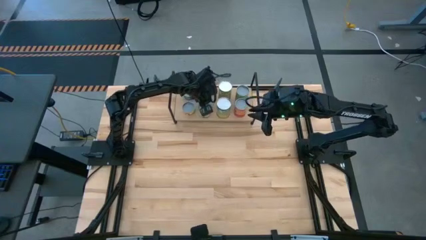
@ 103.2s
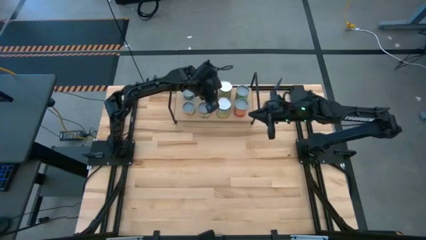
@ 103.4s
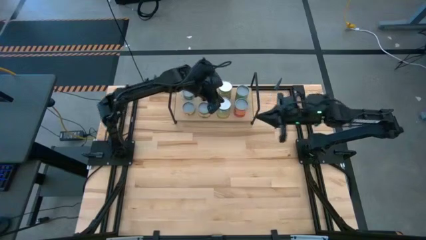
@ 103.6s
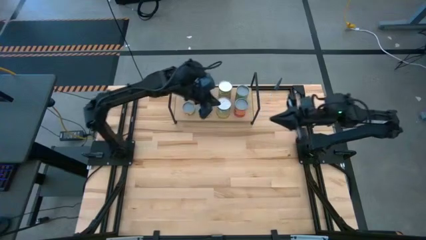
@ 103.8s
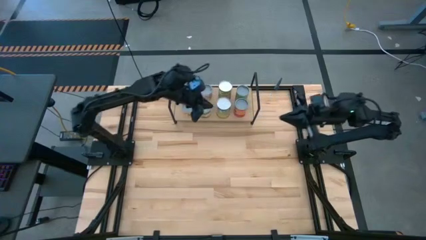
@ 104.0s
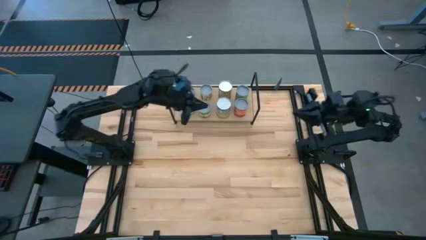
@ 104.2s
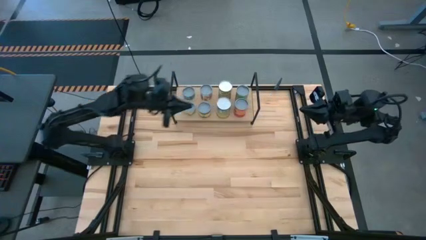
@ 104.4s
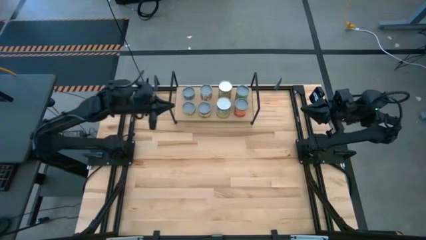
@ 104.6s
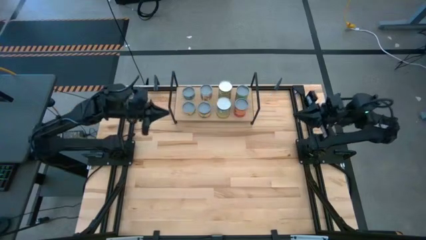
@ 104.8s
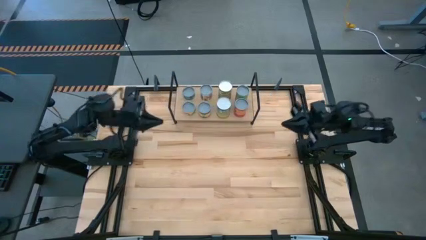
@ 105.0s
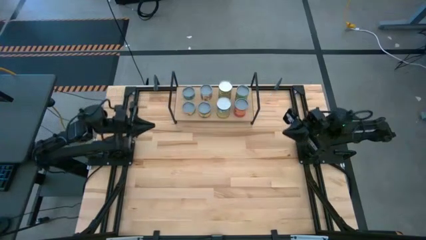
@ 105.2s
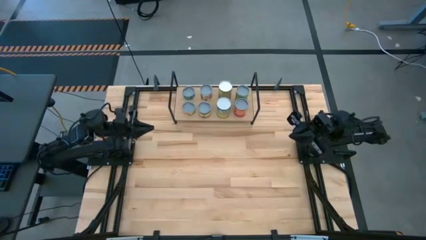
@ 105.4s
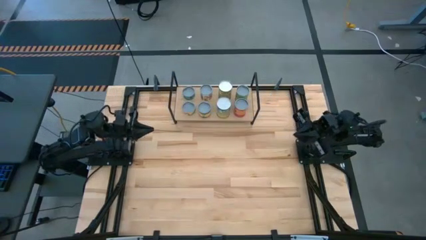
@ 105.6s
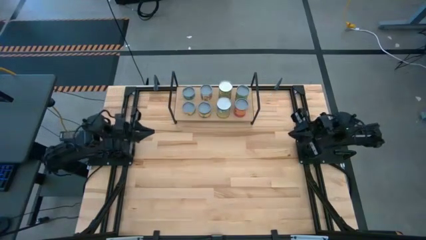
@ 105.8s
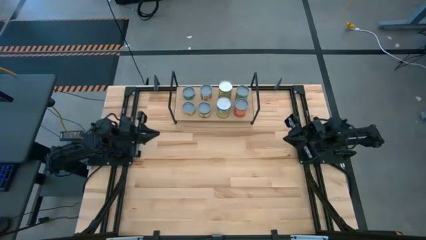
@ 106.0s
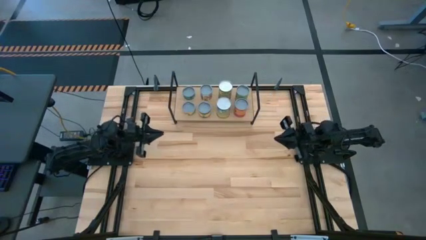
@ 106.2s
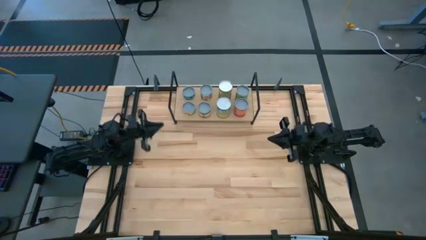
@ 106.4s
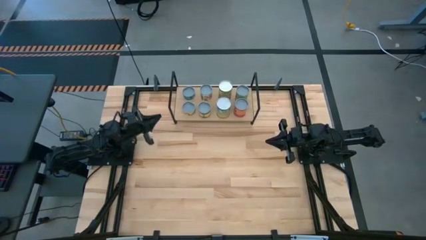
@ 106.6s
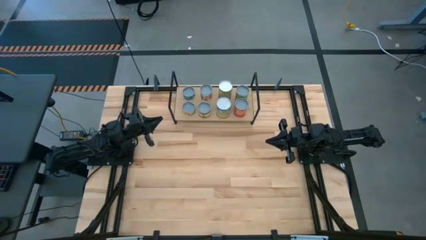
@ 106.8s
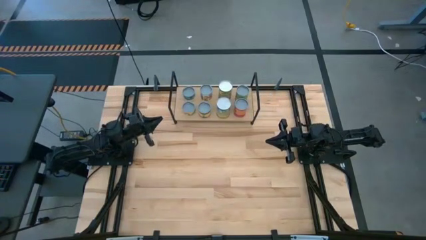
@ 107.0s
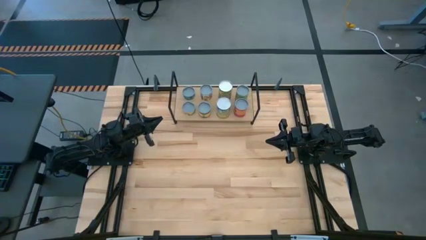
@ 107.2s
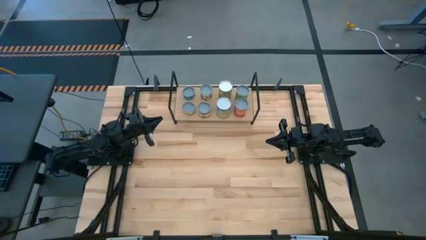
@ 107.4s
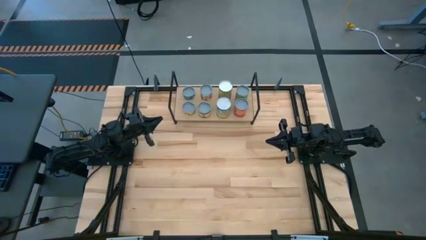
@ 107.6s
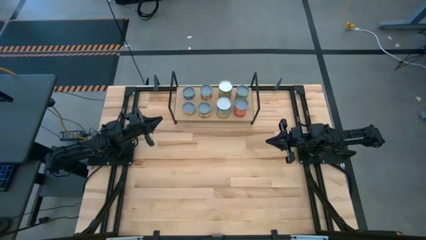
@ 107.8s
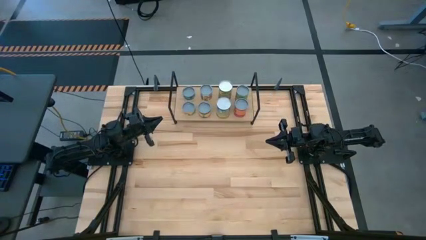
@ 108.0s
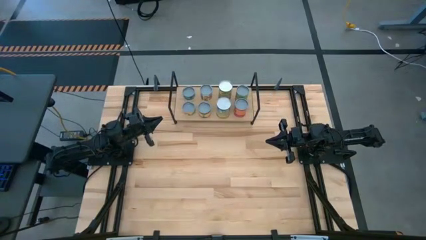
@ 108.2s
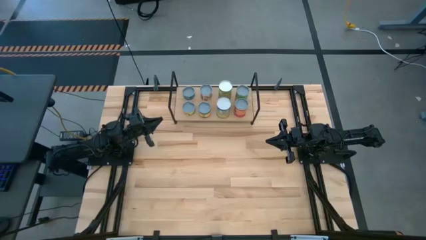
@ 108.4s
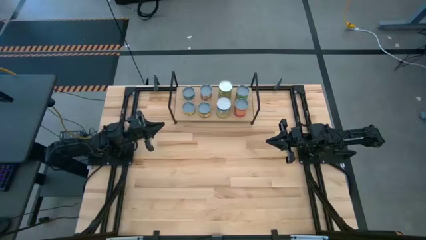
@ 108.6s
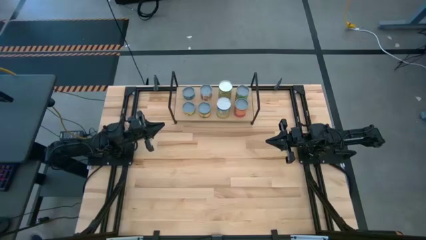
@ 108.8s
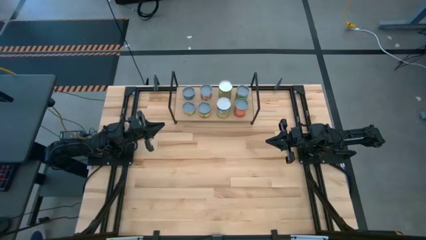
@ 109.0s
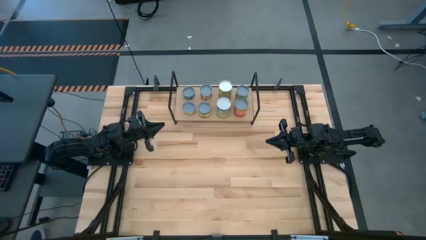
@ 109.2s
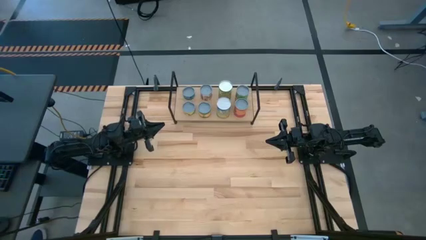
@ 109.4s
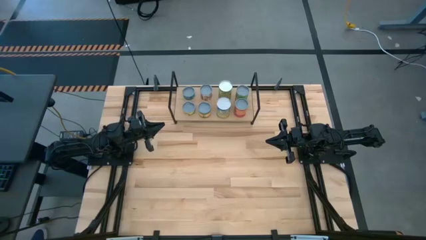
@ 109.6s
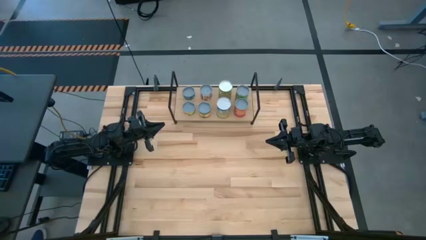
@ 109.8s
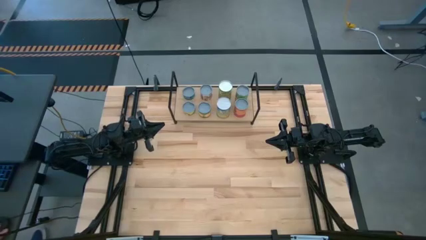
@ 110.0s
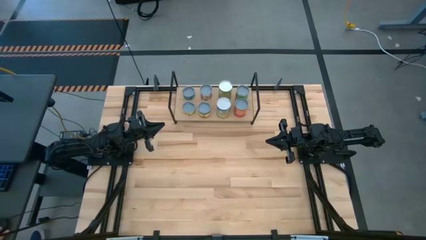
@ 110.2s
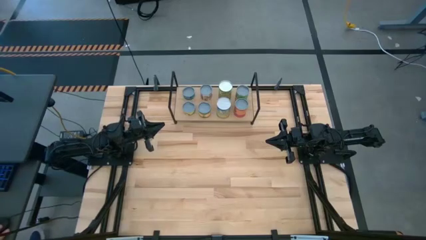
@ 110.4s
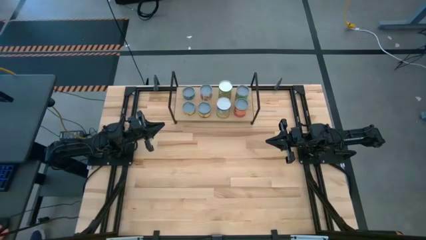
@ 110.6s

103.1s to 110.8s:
Task: Pick and place cans onto a shelf
Return to Home Position

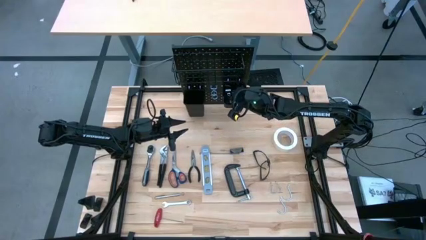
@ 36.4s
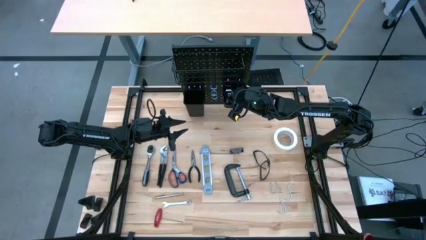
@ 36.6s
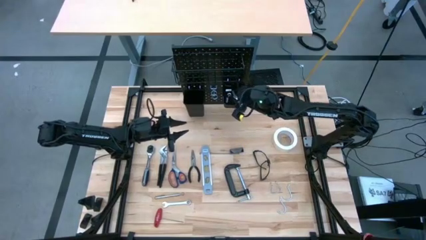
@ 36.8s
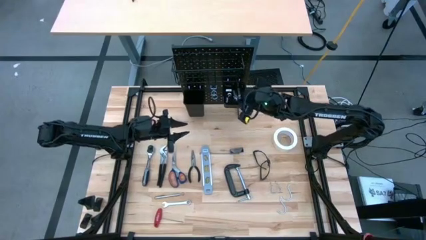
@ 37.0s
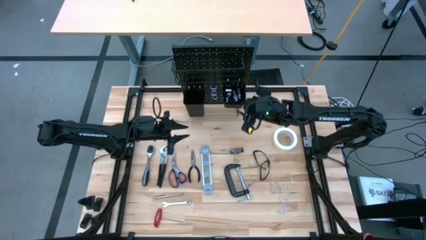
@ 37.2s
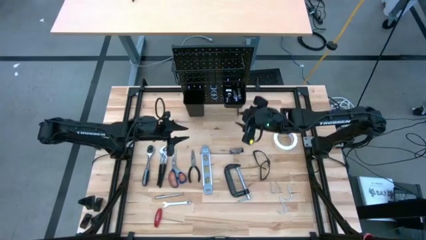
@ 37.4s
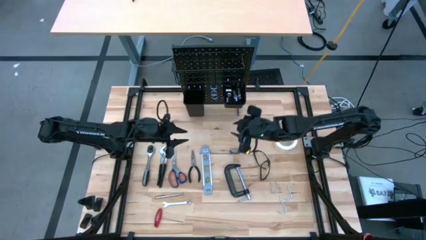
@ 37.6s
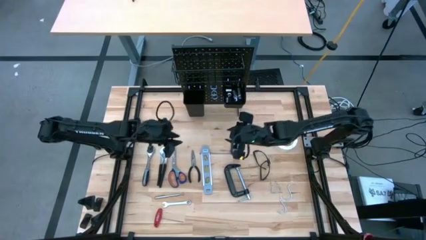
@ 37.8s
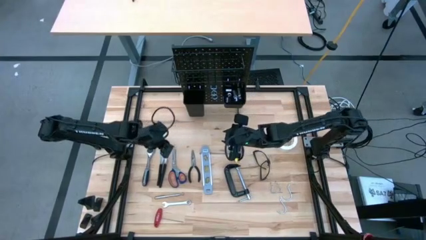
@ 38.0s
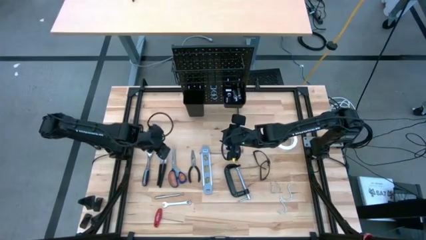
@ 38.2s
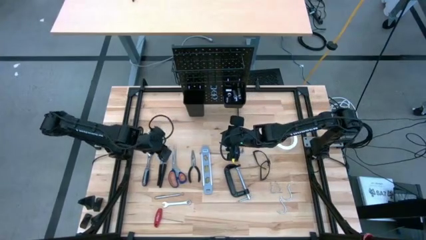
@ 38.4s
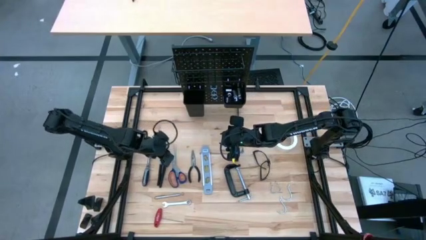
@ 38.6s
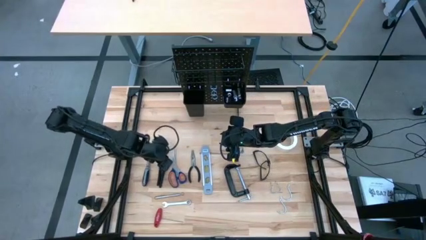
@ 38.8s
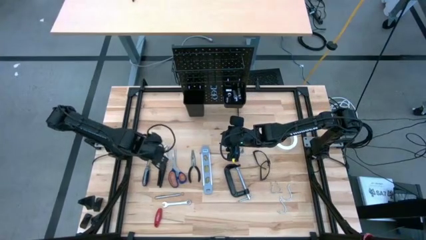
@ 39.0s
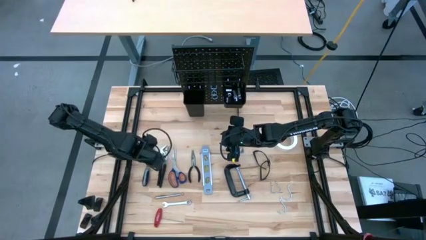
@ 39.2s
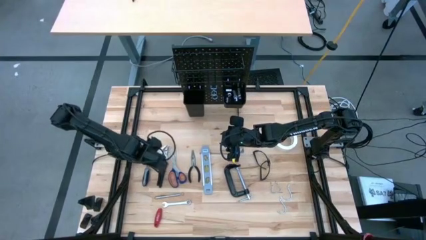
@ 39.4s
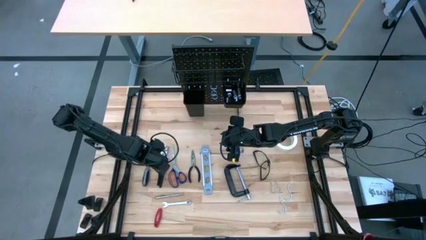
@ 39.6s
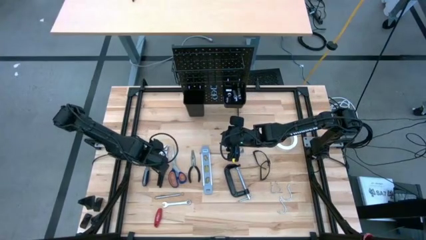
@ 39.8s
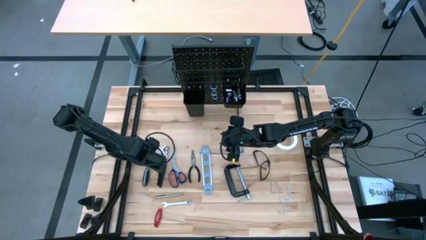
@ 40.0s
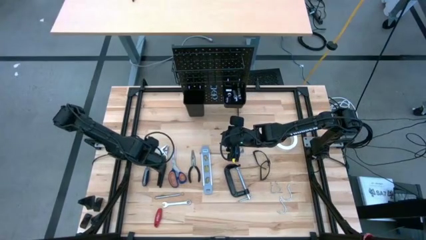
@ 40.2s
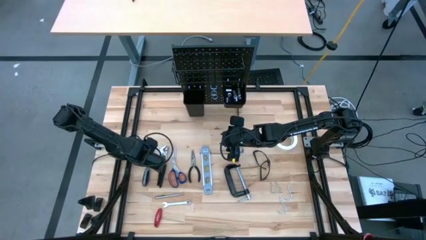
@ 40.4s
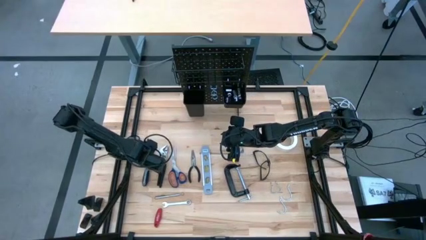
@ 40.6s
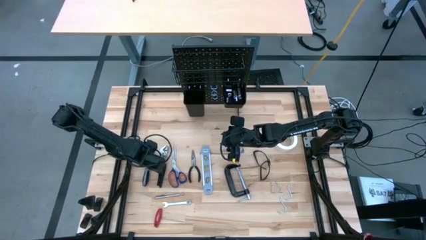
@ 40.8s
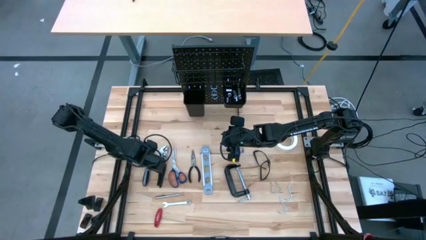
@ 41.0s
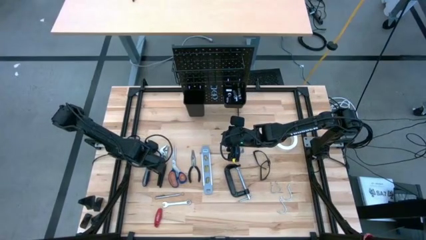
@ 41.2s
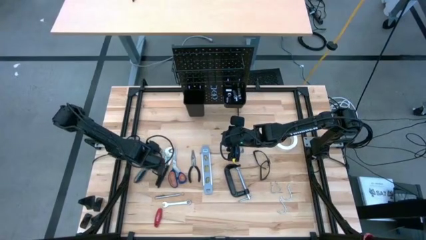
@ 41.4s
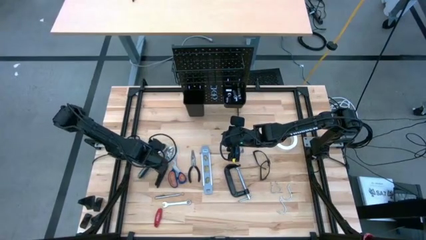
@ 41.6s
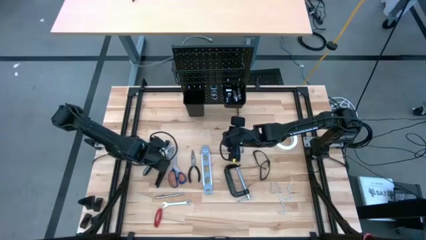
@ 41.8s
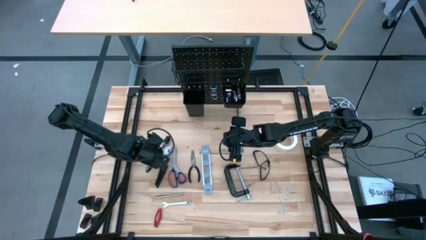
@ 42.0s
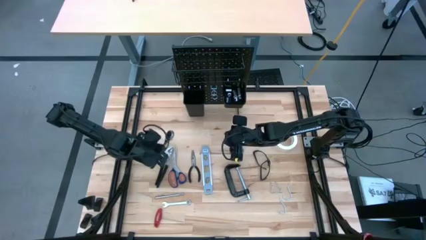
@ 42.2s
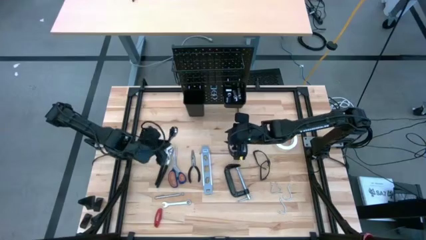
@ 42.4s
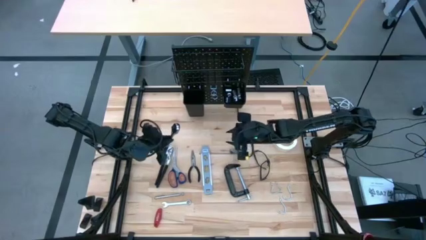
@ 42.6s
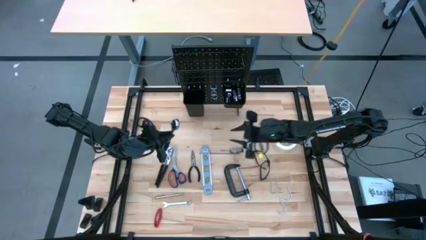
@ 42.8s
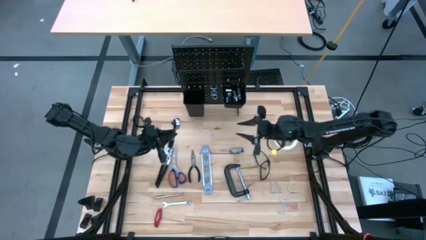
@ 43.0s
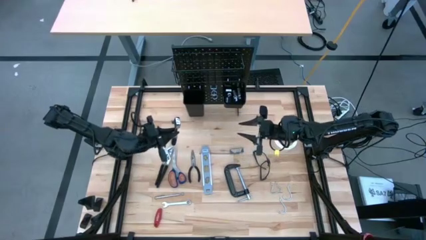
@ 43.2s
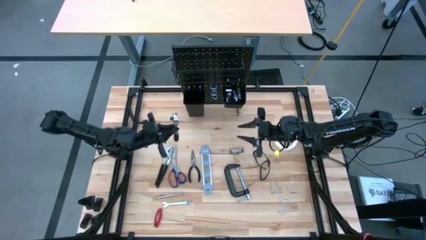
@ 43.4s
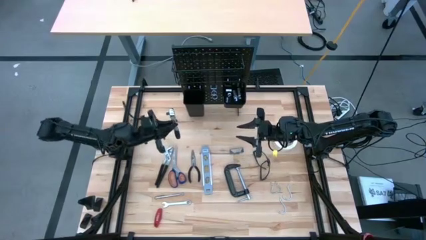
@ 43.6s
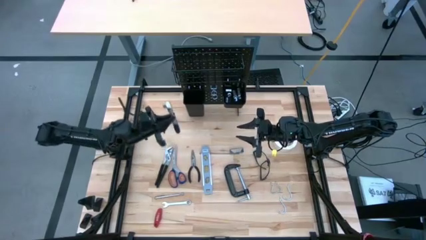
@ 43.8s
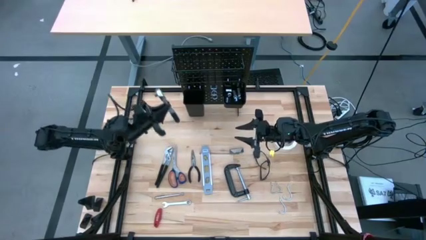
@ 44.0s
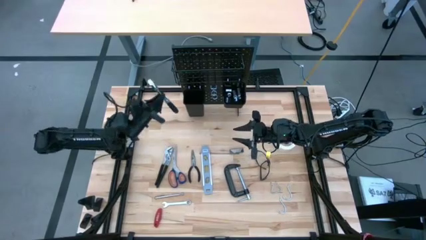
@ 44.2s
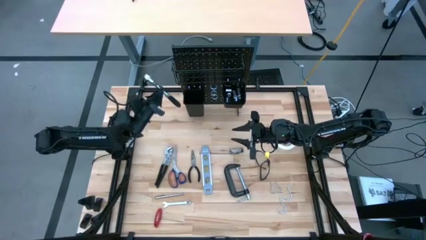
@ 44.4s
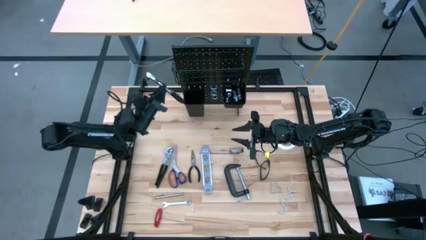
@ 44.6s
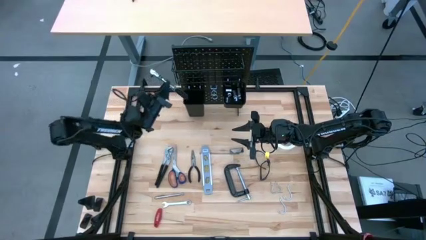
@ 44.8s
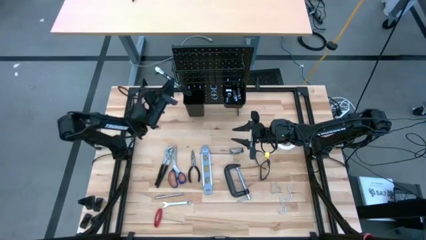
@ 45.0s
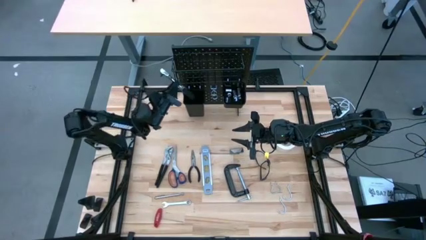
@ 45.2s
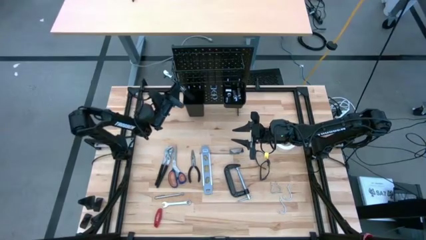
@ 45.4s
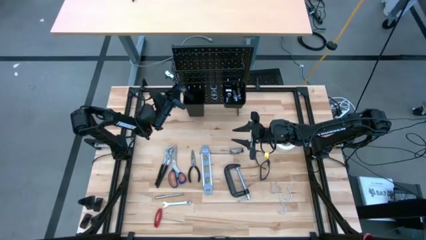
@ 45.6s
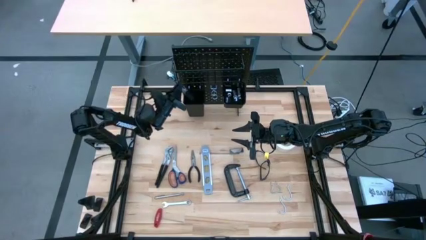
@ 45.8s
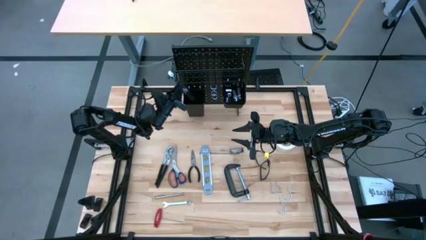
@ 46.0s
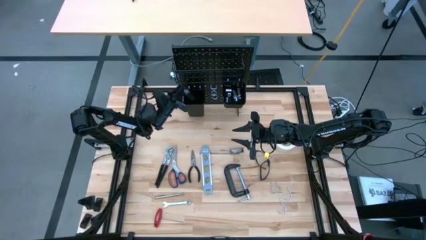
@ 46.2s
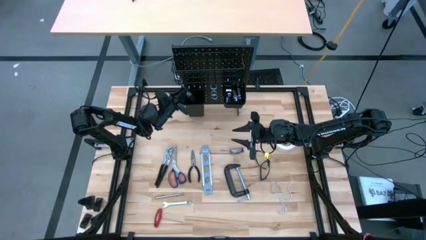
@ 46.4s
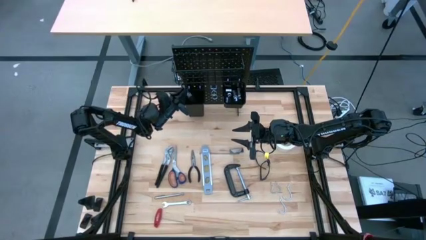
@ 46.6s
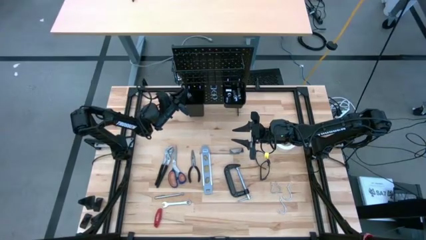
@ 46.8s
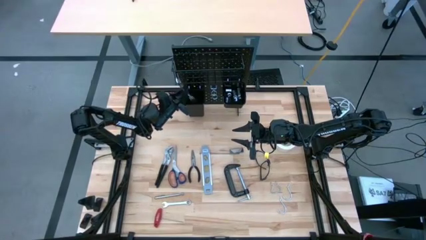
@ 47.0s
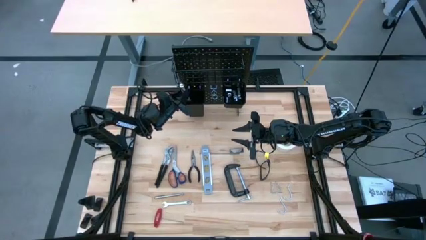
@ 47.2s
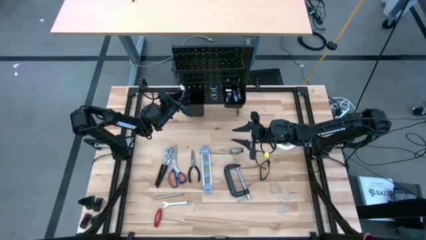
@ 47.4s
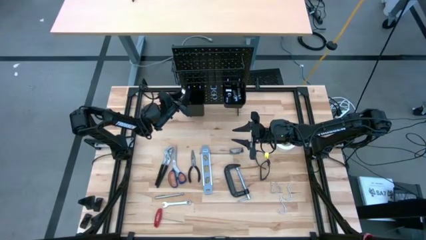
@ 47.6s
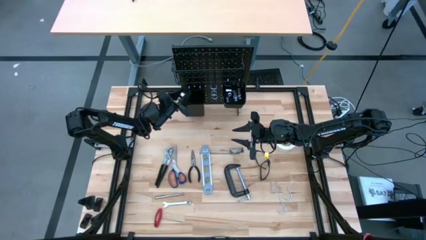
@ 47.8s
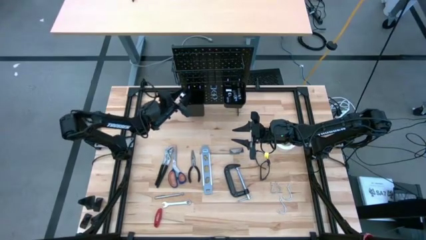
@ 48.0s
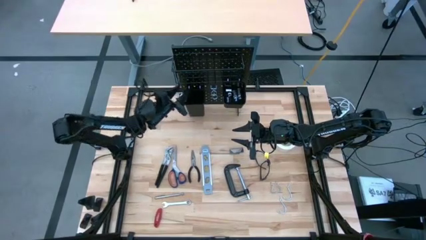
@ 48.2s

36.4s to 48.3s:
Task: Hang tools onto peg board
Put the ratchet wrench into the left black bin on the peg board
